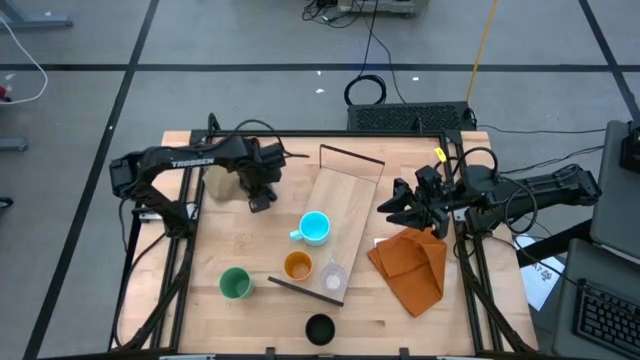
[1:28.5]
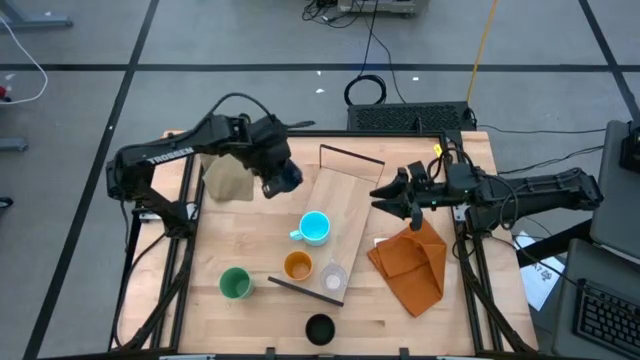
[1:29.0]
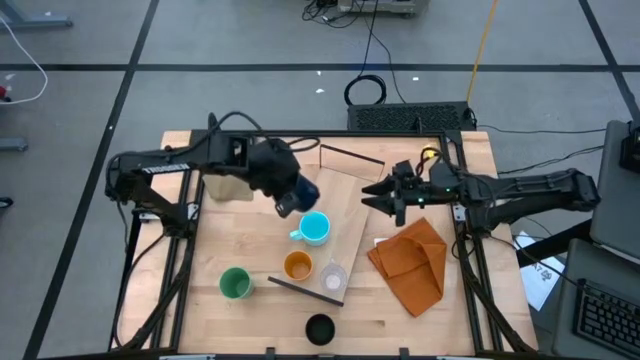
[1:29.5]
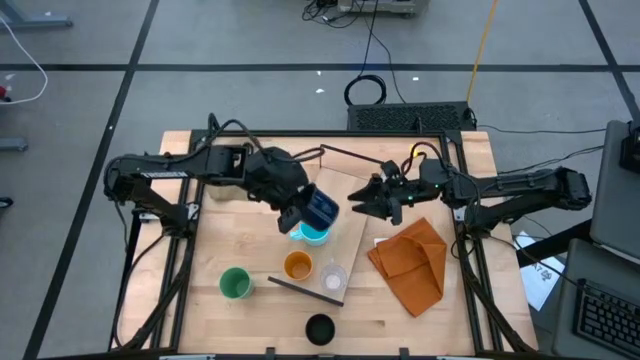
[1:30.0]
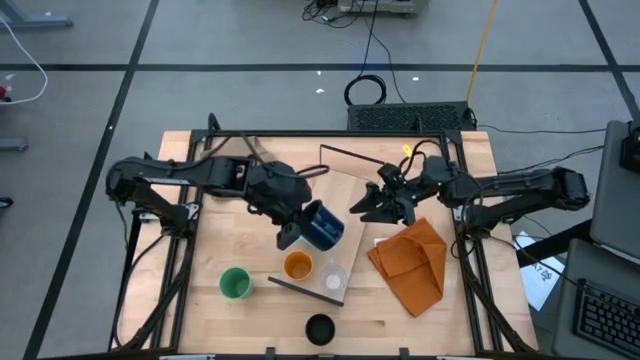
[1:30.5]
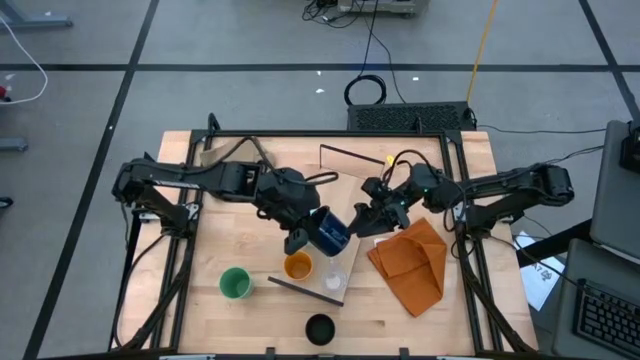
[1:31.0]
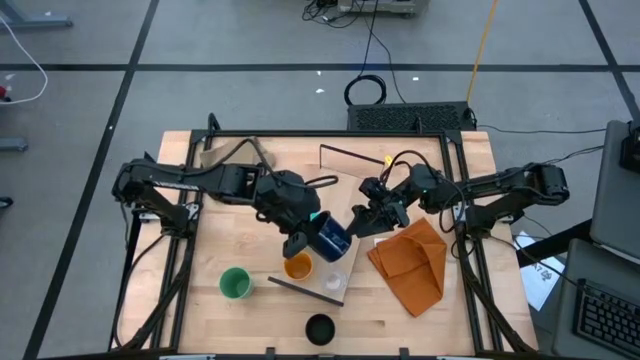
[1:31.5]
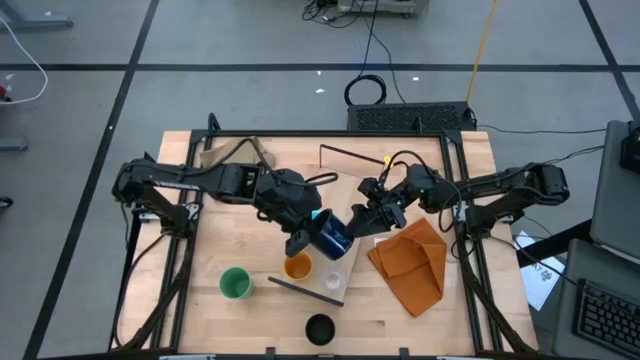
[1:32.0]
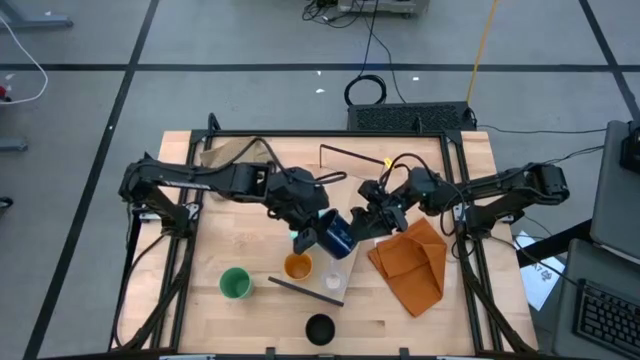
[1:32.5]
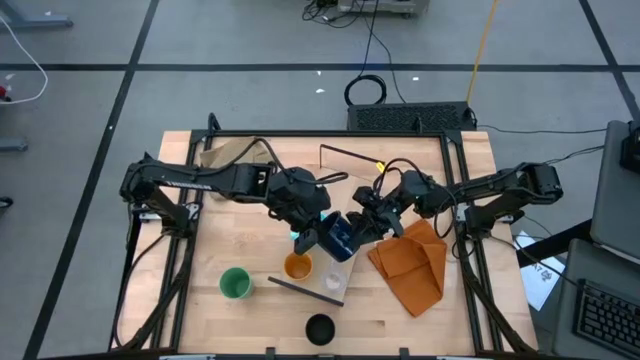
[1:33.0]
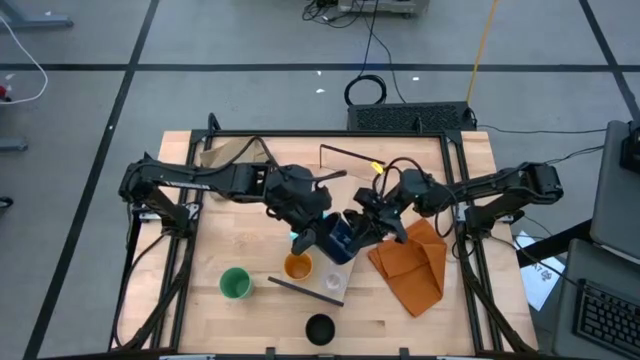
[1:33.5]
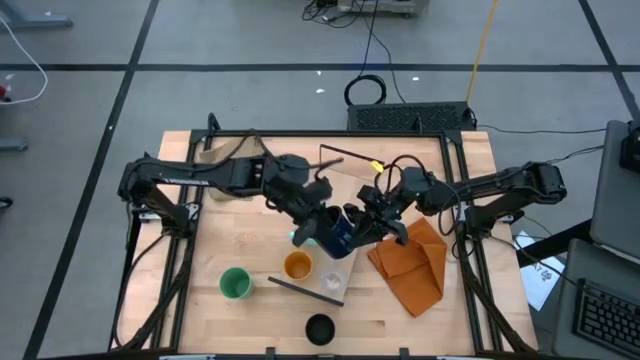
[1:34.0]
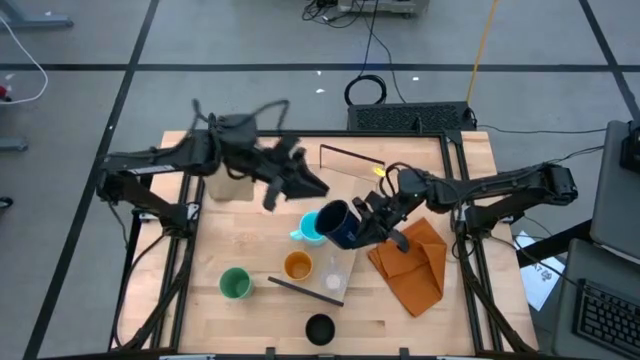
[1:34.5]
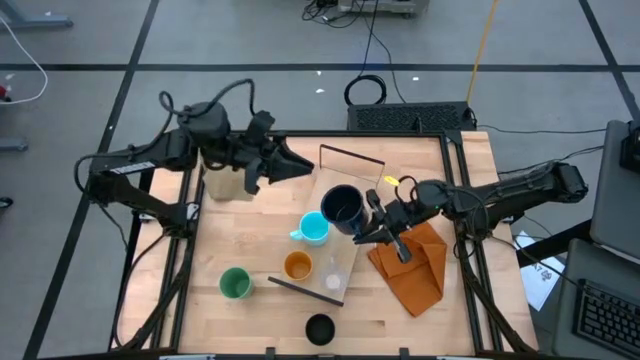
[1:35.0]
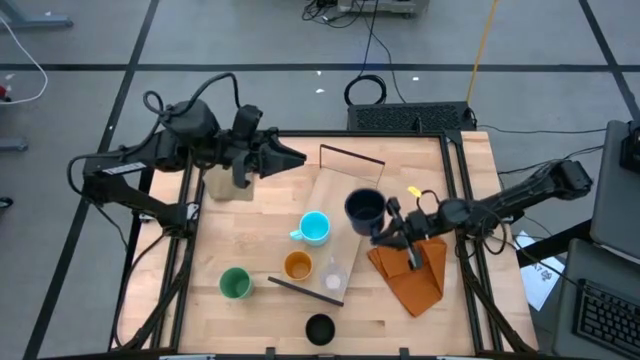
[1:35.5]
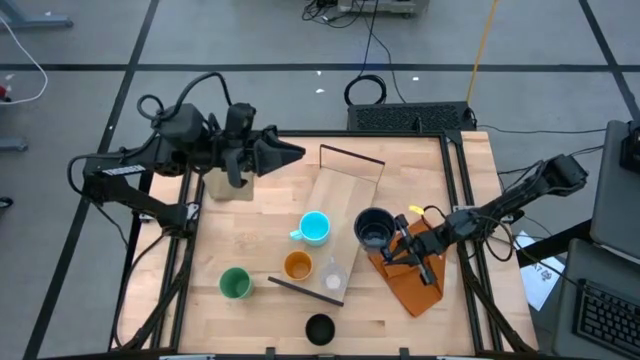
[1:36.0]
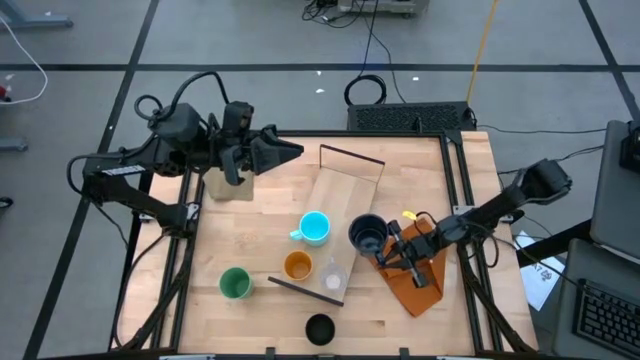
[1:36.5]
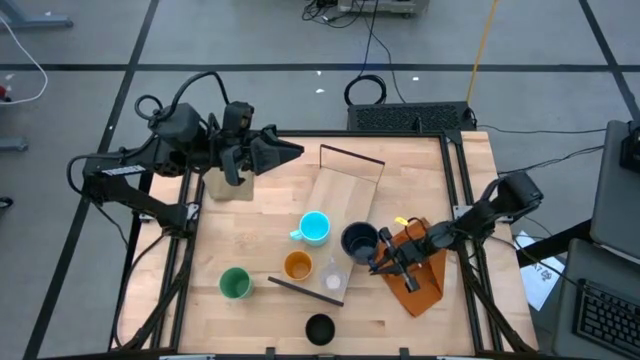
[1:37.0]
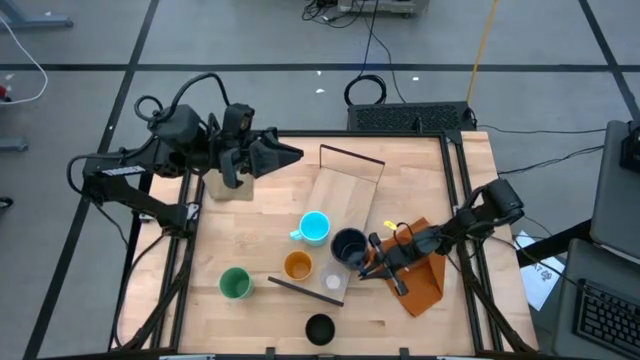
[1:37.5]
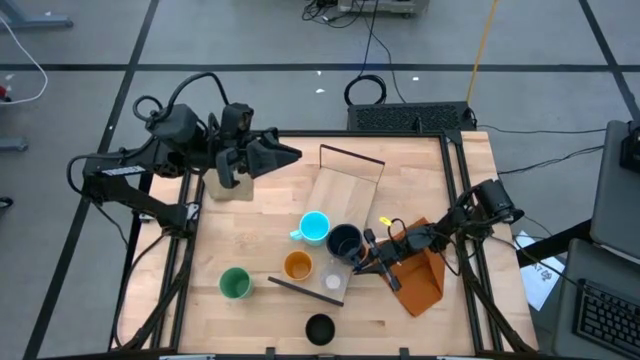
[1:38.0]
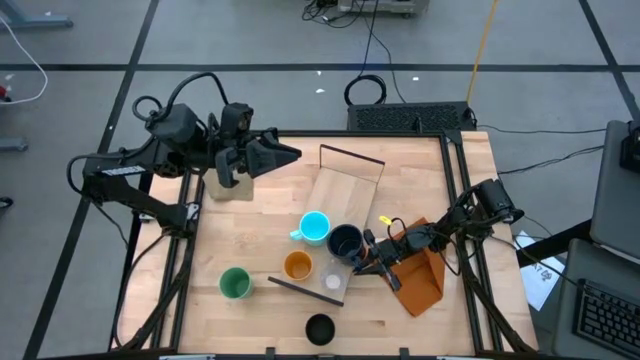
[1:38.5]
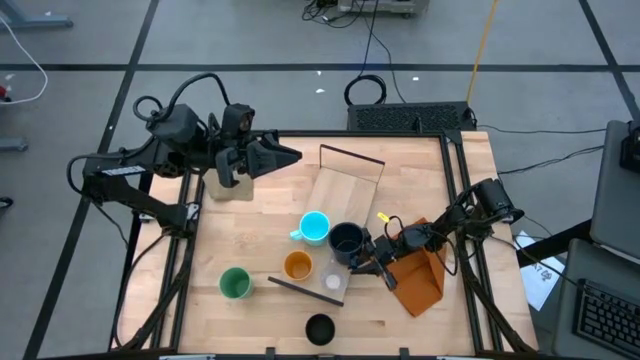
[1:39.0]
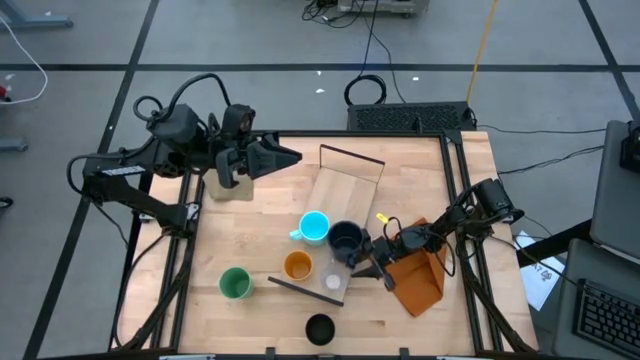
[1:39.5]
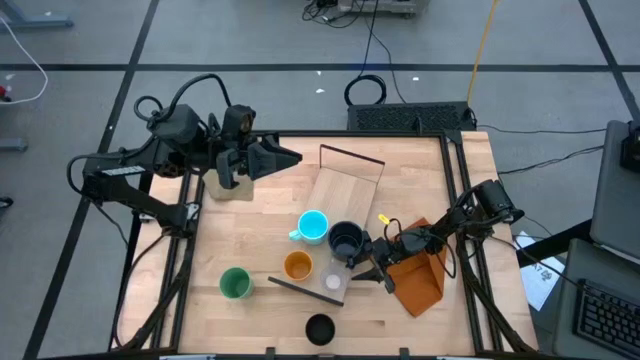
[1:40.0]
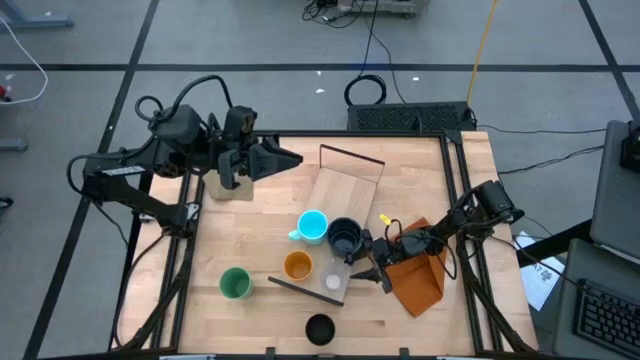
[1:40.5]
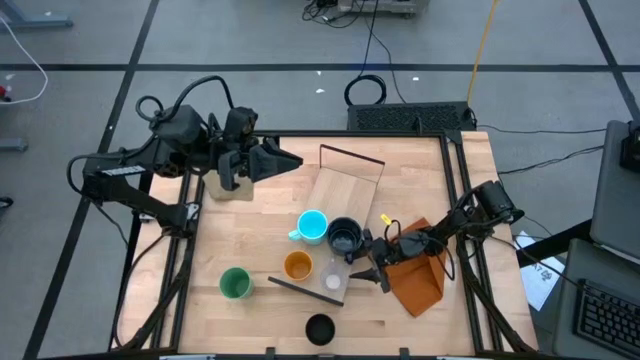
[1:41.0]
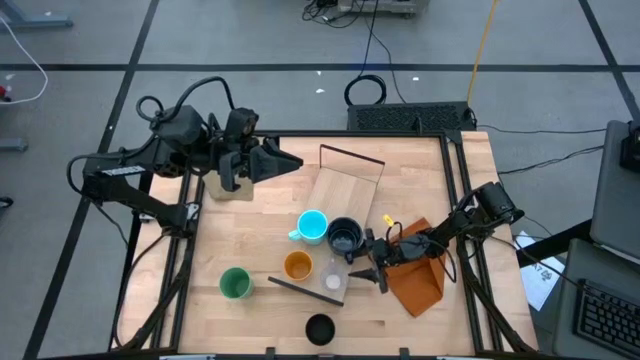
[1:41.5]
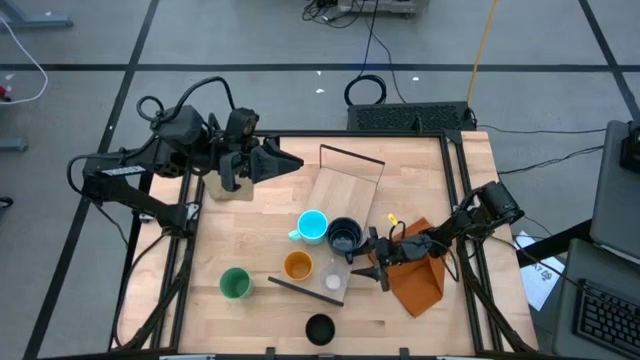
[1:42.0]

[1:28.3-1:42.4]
Task: Stack small to large cups/mugs on shelf
Put the dark blue mug on the shelf

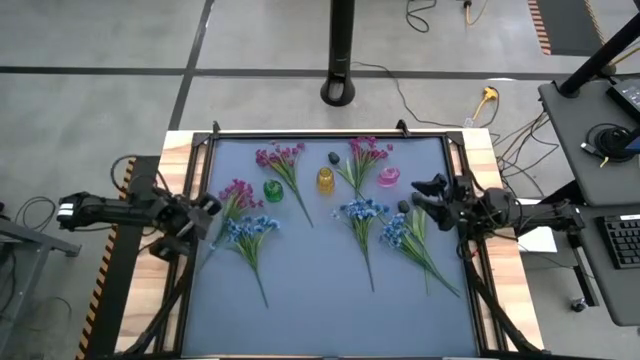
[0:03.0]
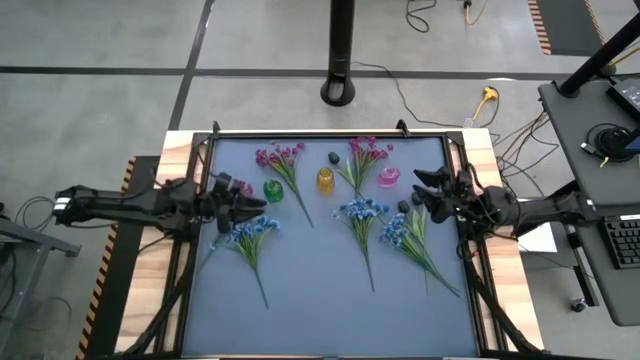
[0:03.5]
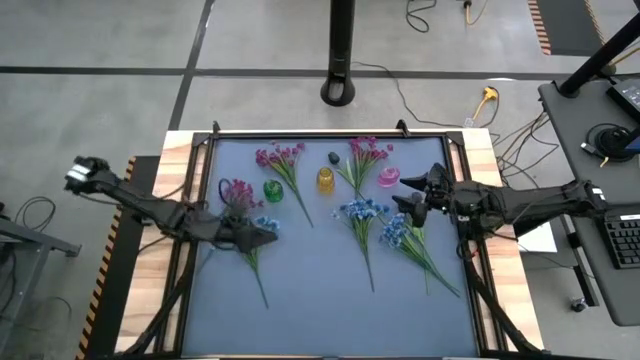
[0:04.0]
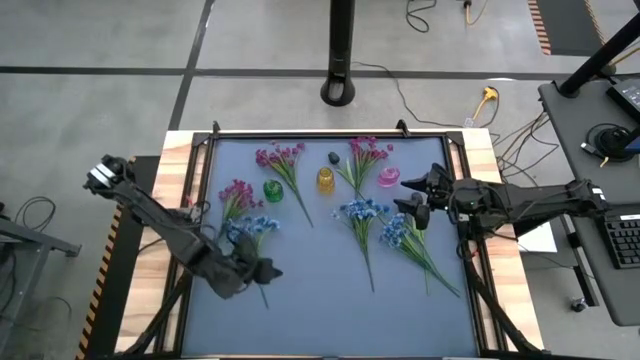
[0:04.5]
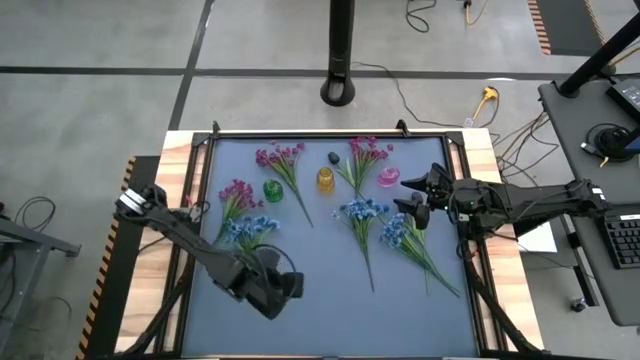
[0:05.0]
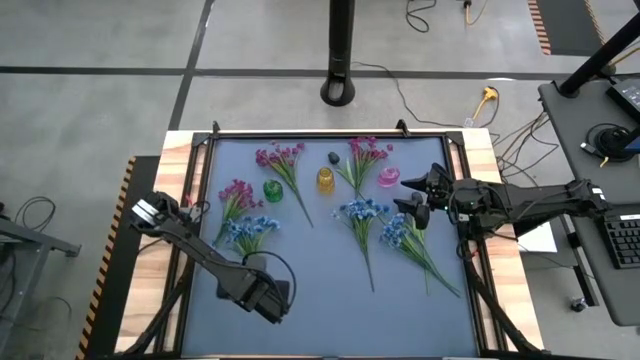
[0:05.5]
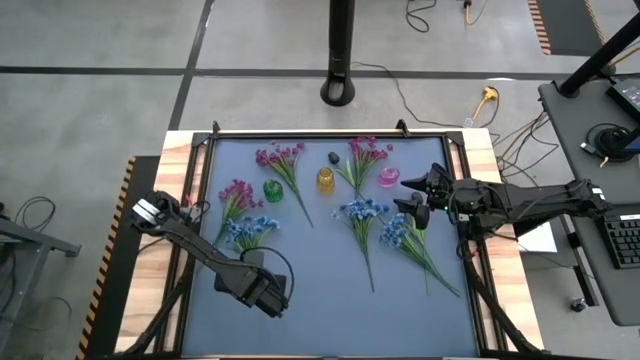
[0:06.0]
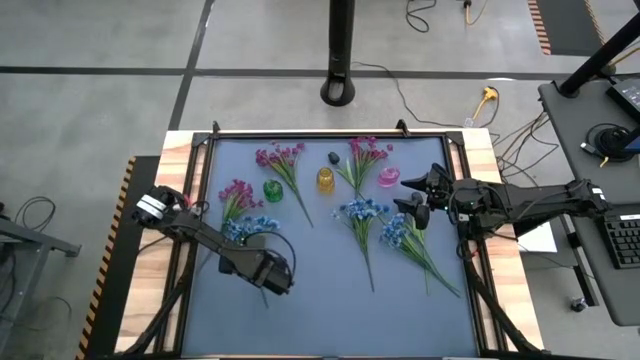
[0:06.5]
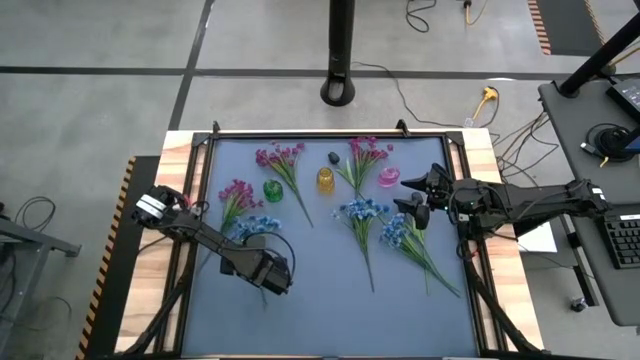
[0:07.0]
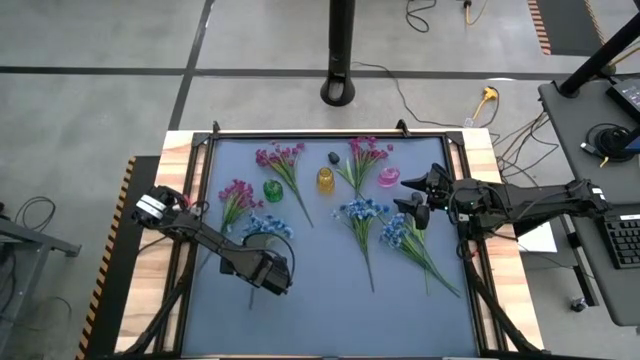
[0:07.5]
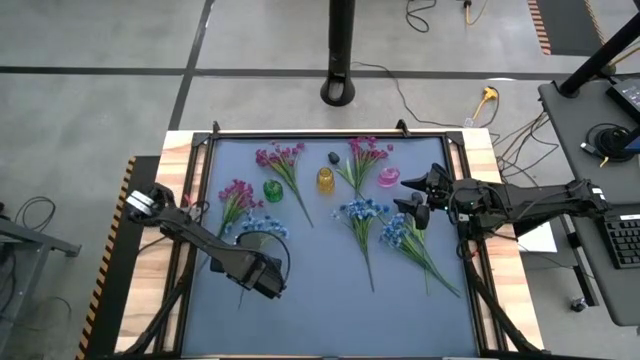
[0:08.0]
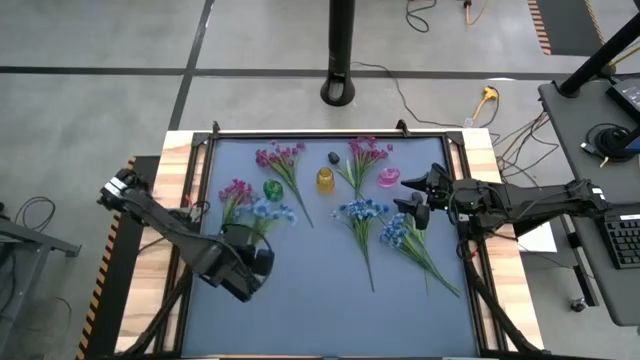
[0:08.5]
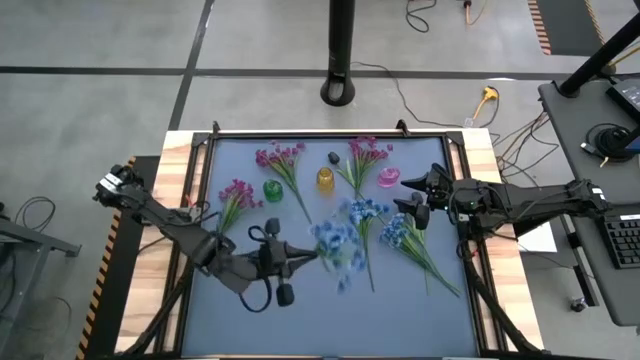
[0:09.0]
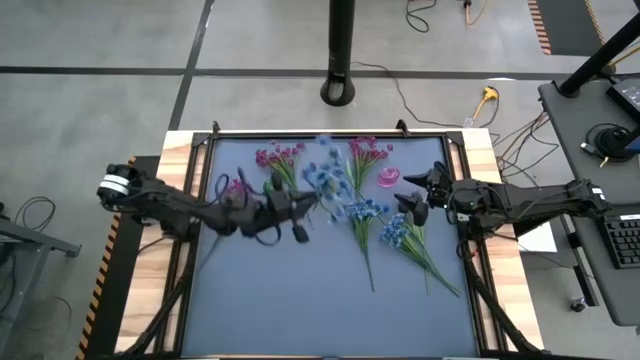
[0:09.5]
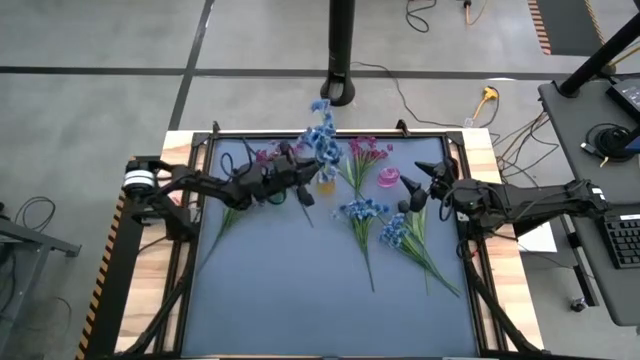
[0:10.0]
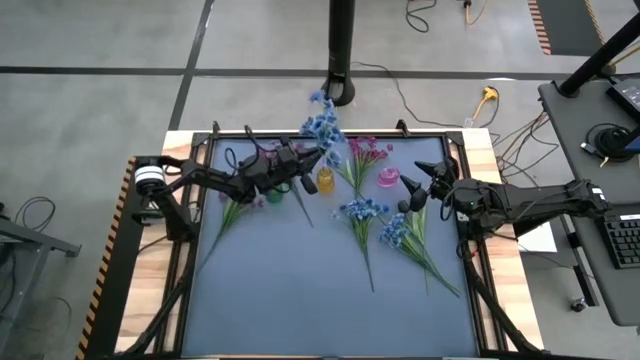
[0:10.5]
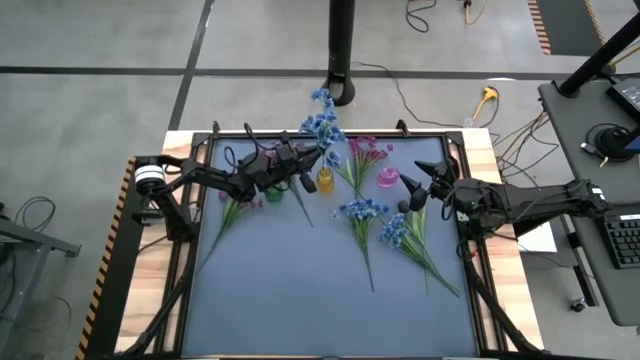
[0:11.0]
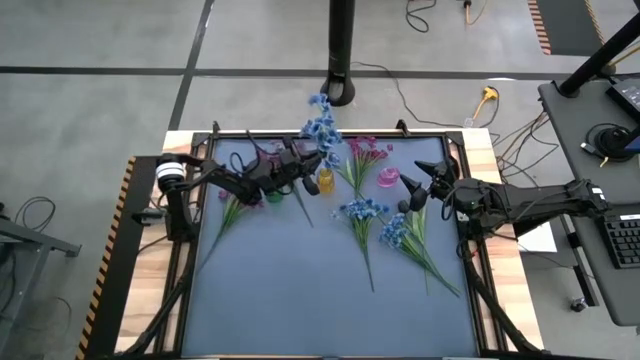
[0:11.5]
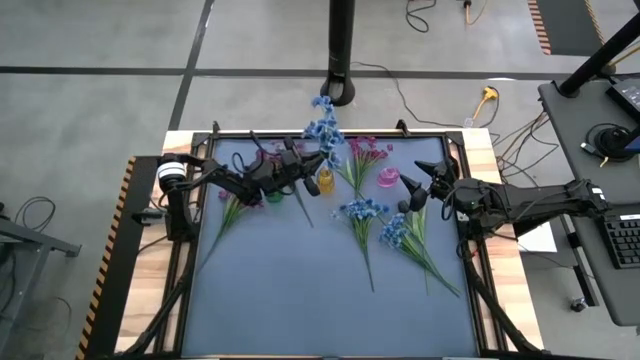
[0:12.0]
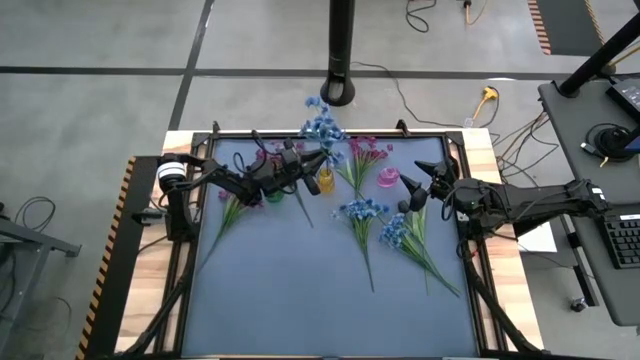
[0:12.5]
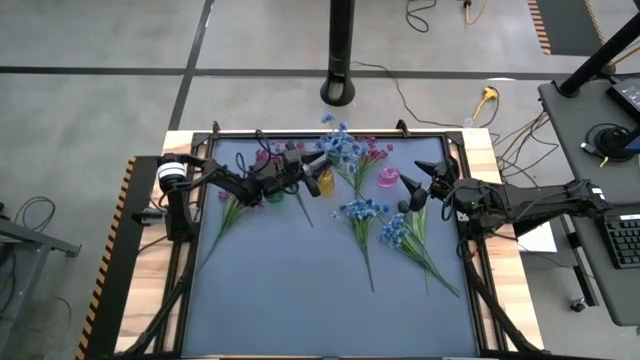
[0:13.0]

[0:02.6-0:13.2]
Task: Sort flowers into vase by color
Put the left blue flowers into the yellow flower vase
